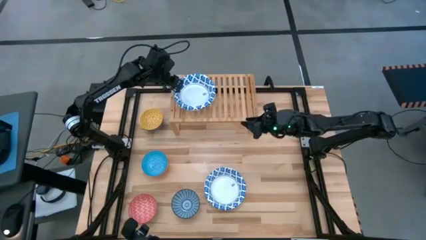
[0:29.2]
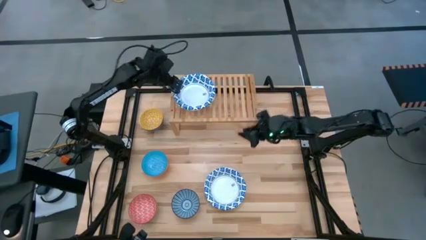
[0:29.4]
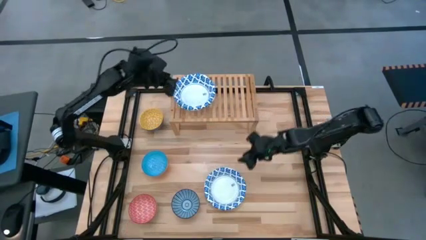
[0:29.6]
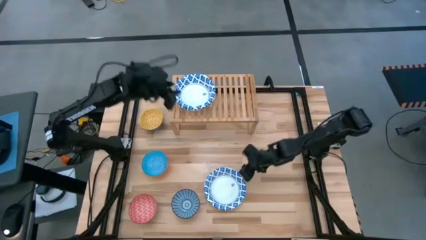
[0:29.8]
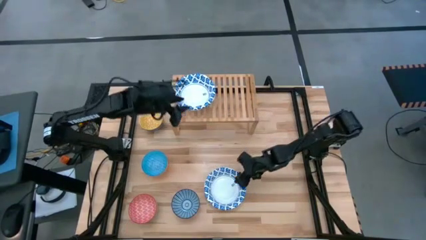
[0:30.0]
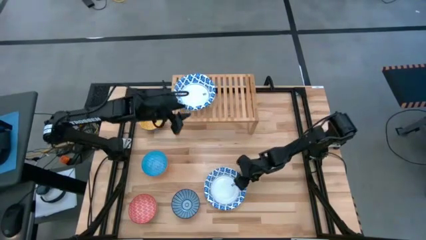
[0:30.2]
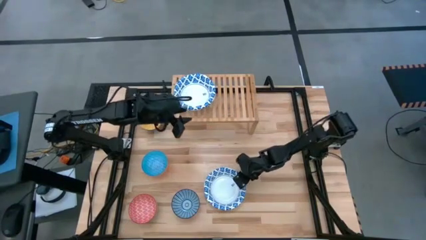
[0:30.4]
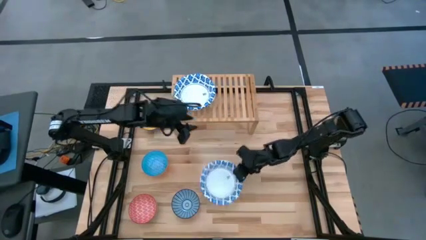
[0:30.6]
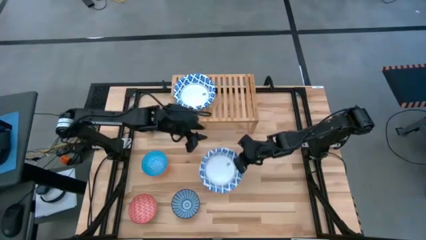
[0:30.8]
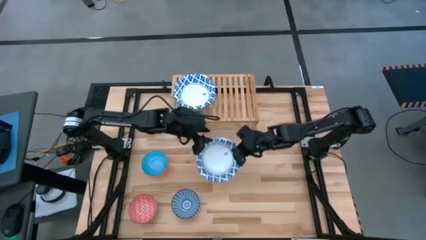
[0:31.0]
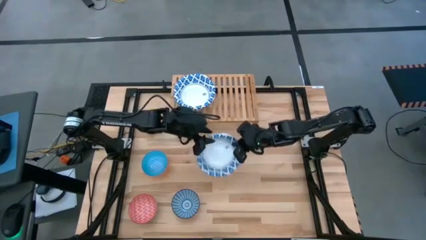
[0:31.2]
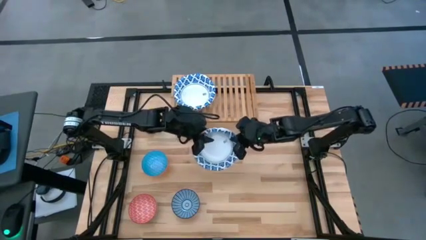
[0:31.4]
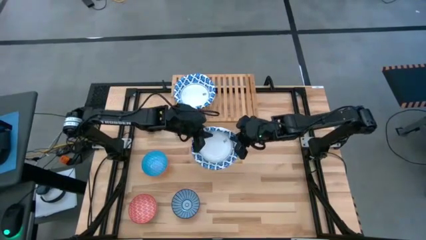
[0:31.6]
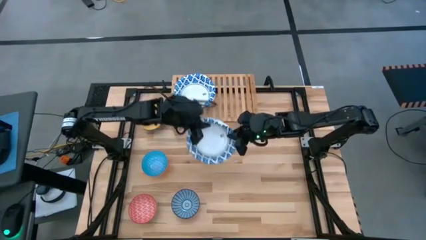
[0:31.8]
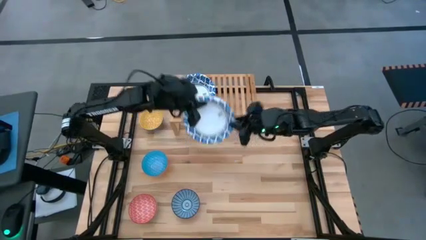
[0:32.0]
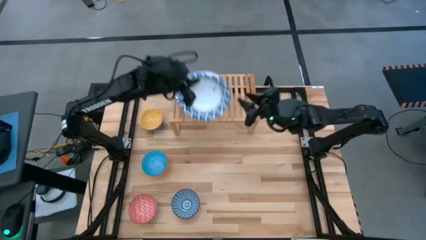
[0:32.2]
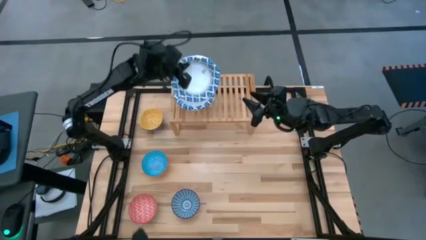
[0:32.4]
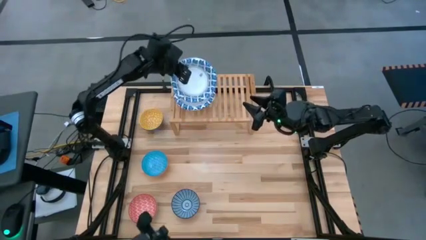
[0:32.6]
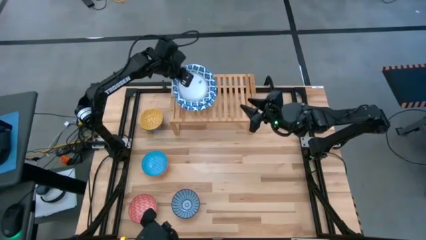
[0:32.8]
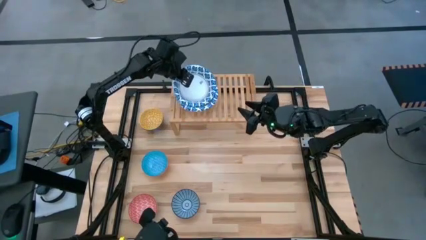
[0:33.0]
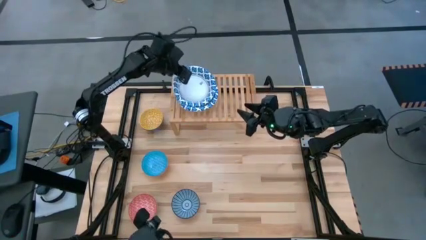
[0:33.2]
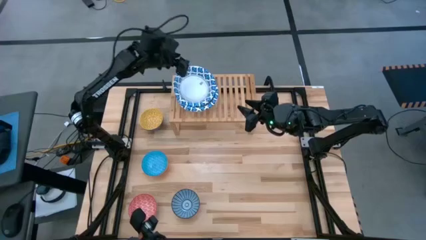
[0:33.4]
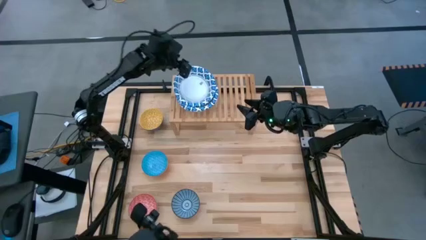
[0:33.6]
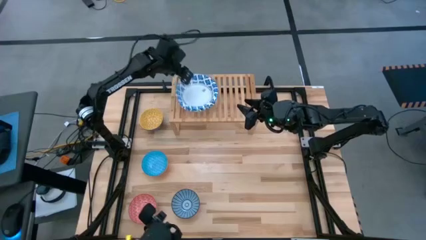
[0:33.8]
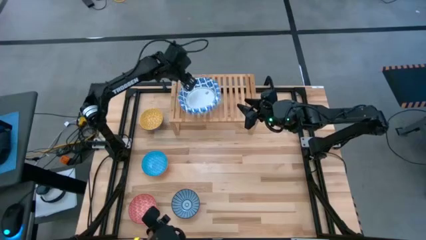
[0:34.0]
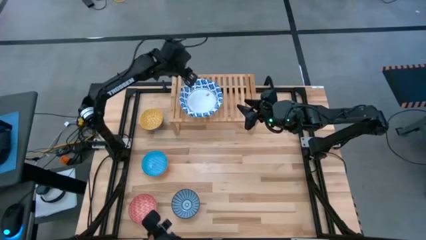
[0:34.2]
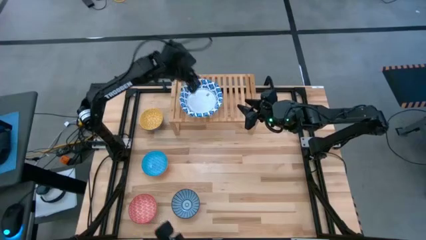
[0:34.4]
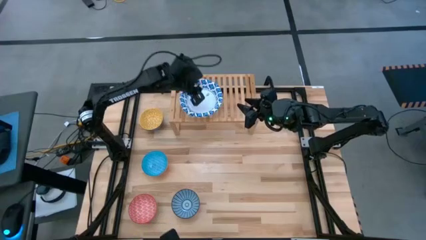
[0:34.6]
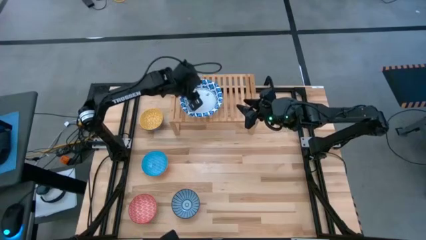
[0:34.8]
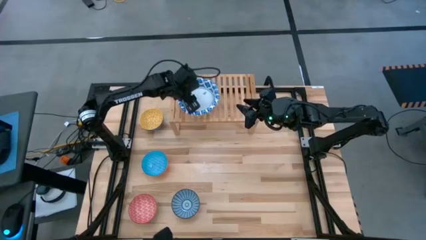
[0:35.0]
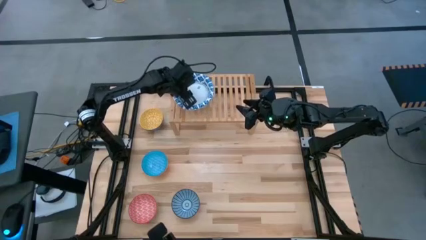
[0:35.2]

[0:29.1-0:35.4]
Task: Place and stack bowls onto a shelf
Stack the white patterned bowl on top of the other white patterned bowl on the shelf

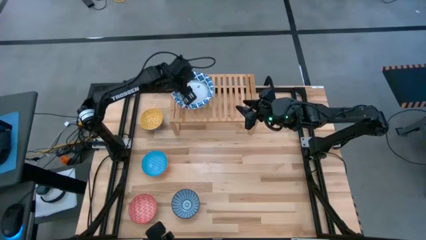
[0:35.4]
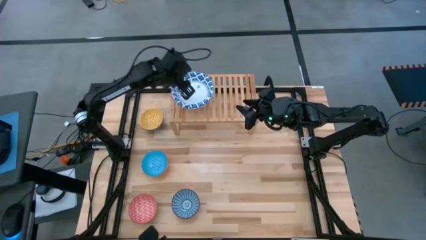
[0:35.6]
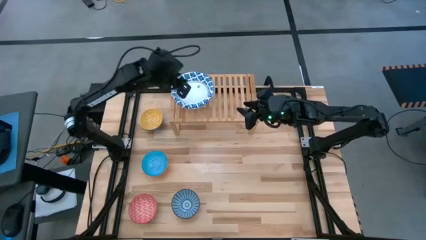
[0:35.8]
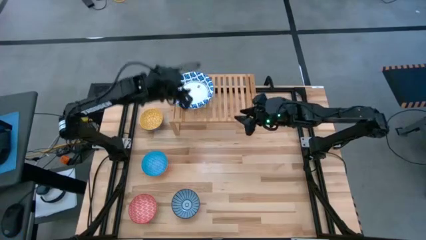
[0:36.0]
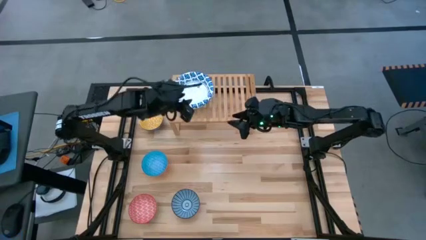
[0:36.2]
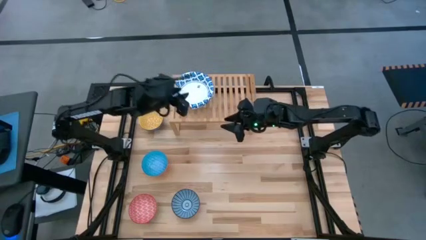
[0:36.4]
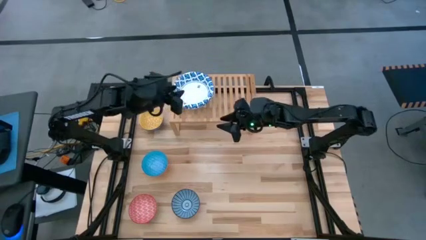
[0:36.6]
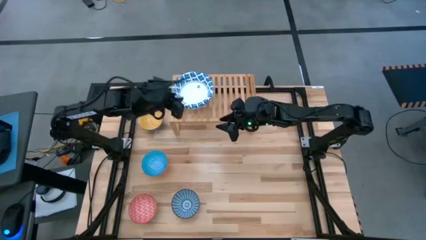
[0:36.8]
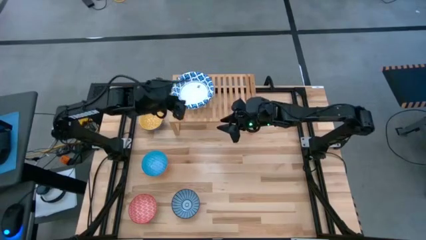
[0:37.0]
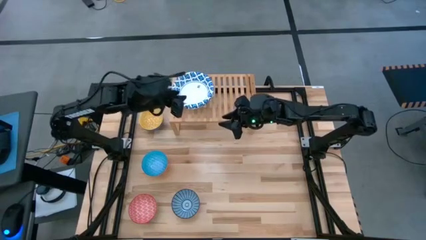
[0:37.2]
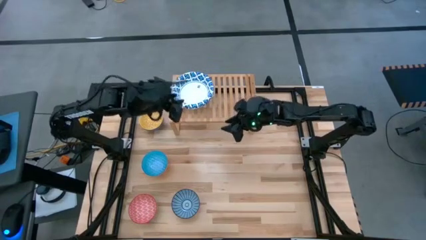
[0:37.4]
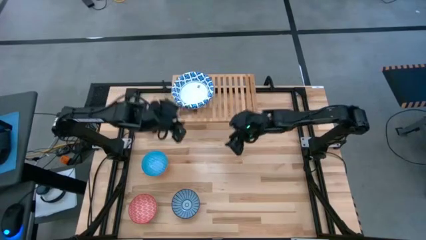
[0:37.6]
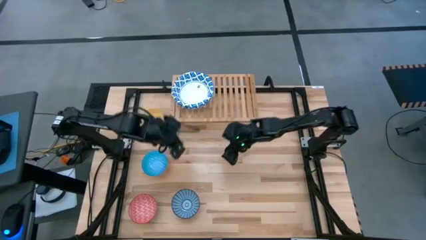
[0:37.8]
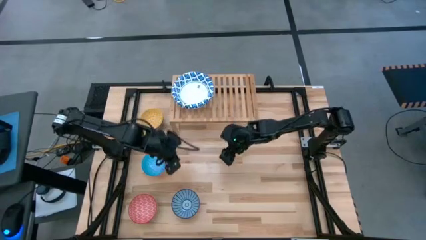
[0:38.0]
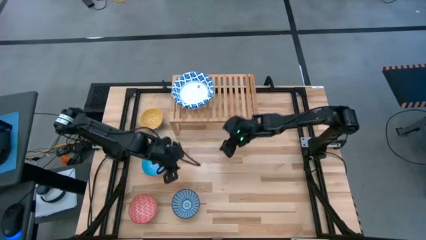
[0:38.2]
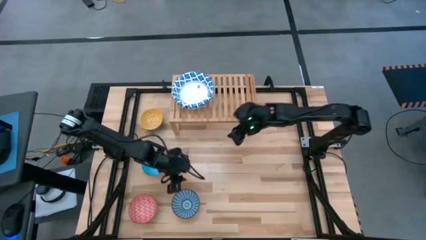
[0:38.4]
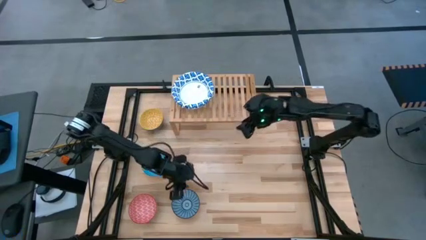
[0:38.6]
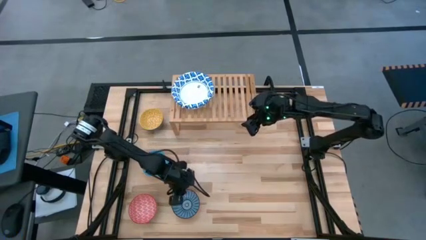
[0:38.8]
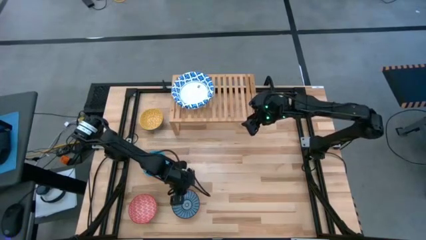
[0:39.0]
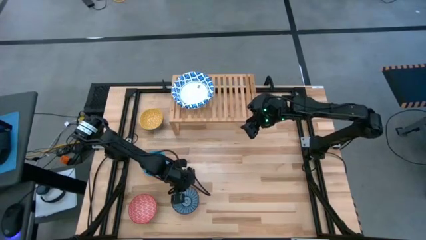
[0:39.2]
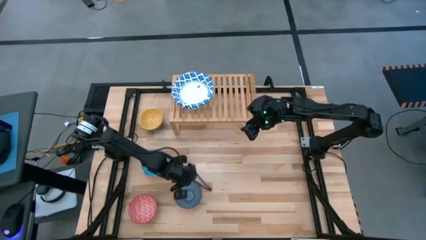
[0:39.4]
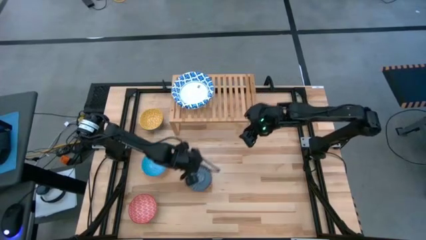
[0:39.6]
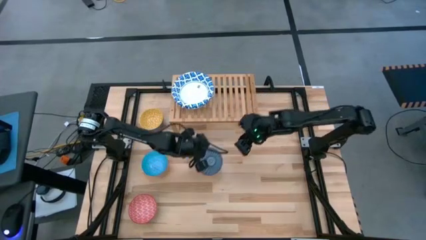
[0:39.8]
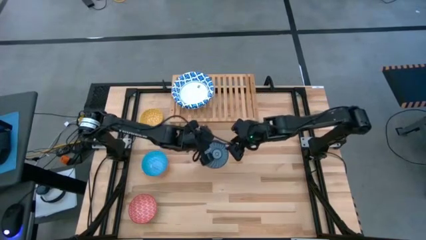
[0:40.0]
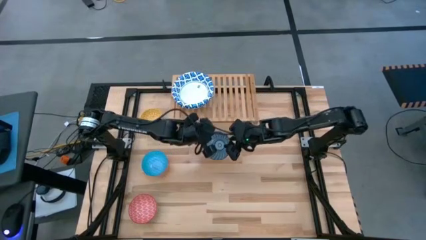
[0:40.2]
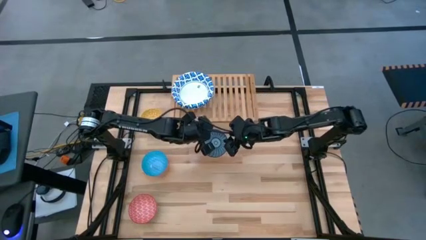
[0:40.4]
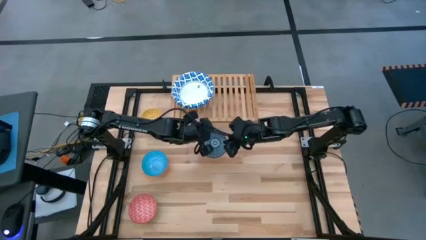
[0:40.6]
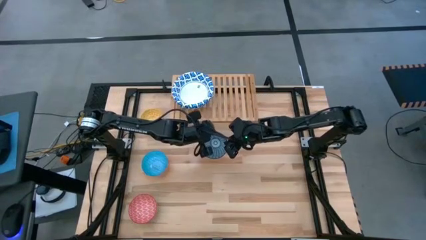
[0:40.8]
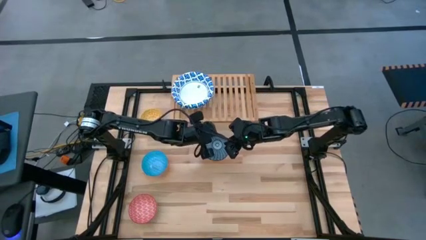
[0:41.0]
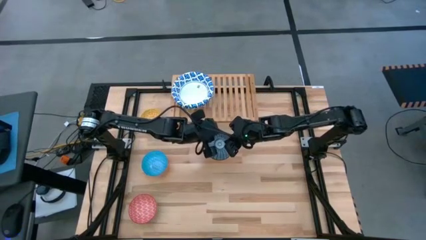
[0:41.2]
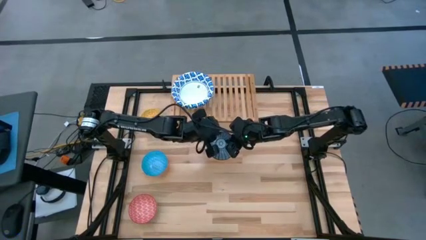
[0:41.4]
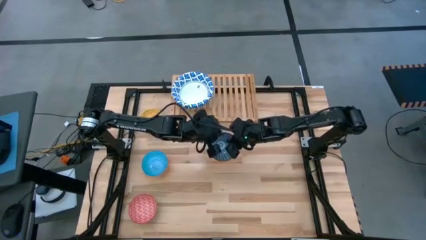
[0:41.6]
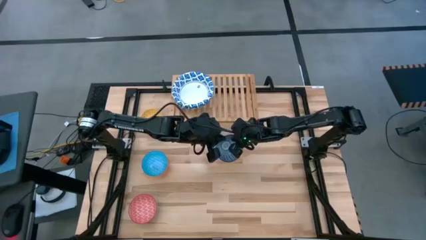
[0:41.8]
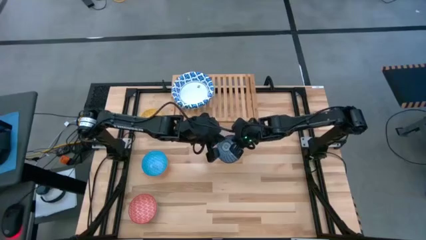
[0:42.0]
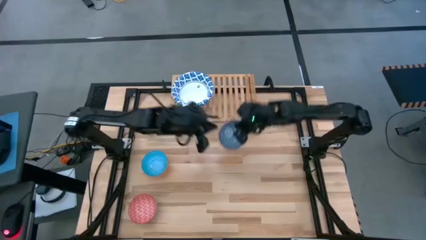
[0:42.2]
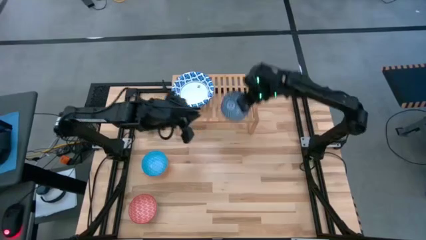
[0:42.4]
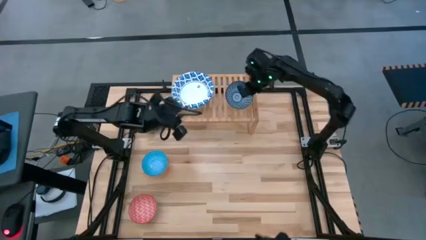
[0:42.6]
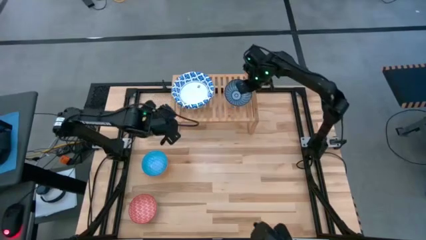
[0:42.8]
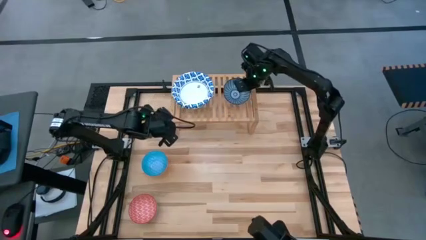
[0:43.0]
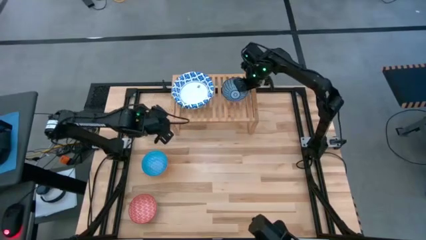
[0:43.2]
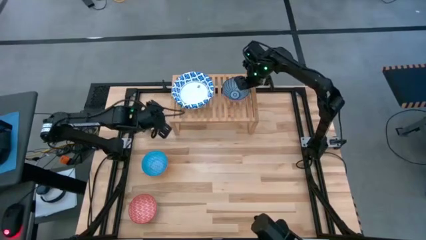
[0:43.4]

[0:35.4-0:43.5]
Put the red blue patterned bowl on the shelf

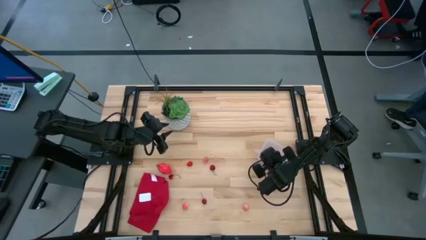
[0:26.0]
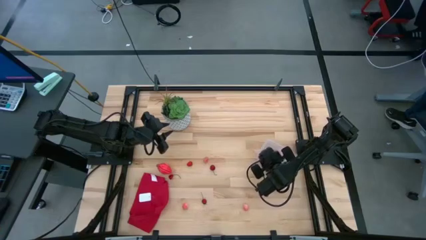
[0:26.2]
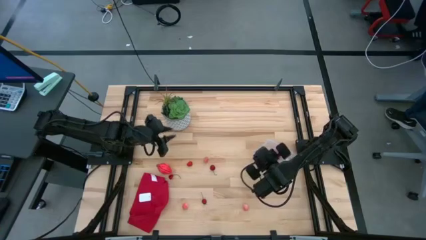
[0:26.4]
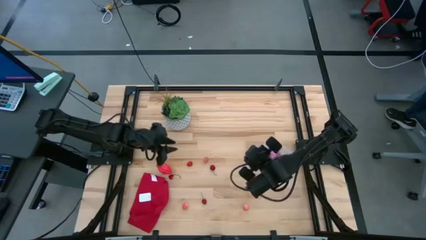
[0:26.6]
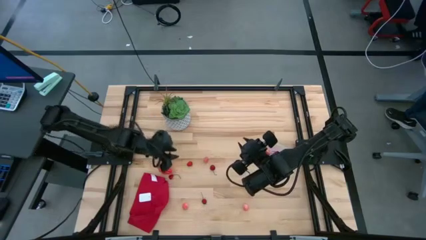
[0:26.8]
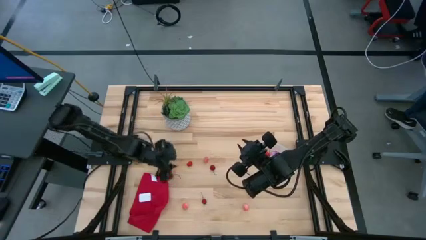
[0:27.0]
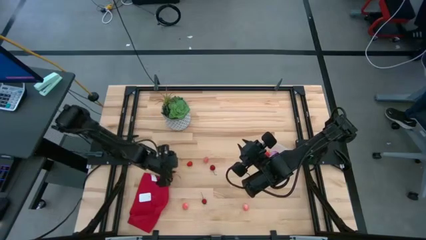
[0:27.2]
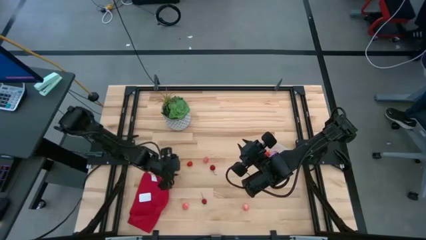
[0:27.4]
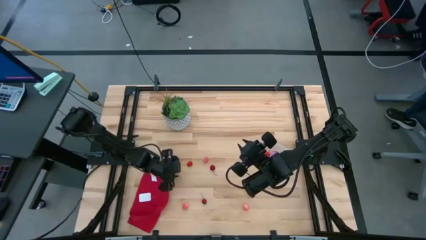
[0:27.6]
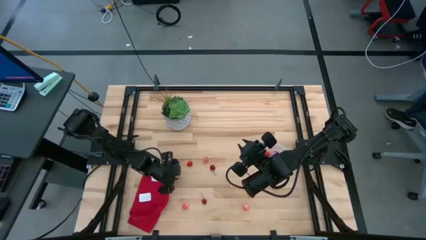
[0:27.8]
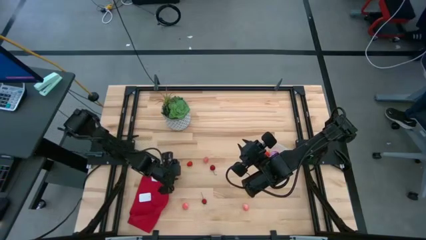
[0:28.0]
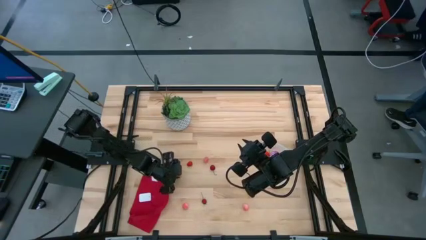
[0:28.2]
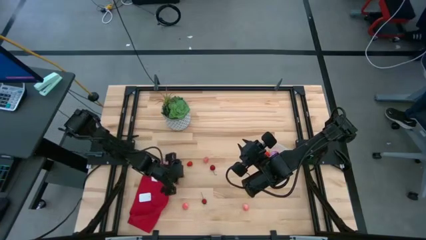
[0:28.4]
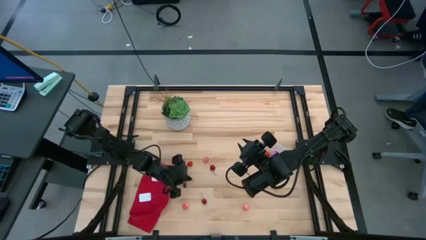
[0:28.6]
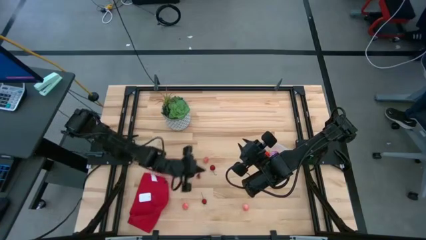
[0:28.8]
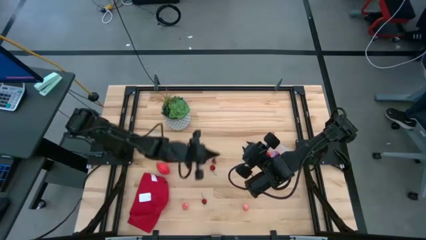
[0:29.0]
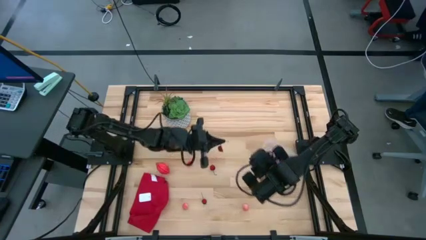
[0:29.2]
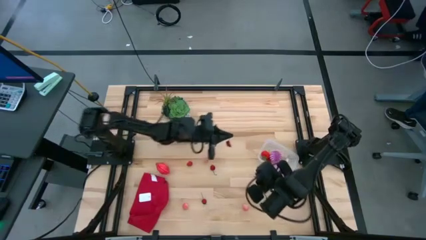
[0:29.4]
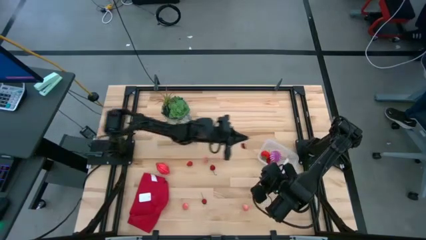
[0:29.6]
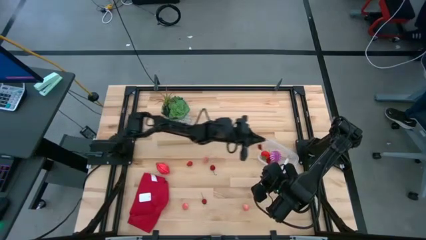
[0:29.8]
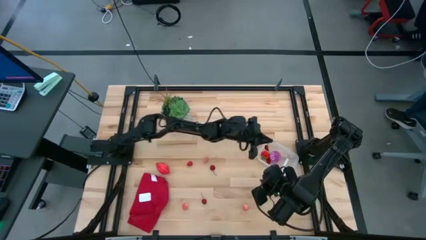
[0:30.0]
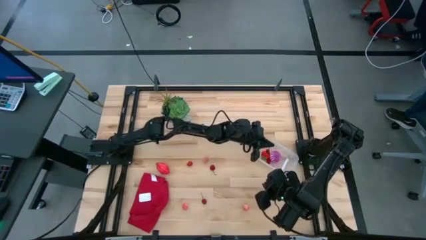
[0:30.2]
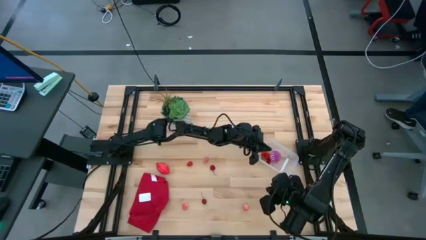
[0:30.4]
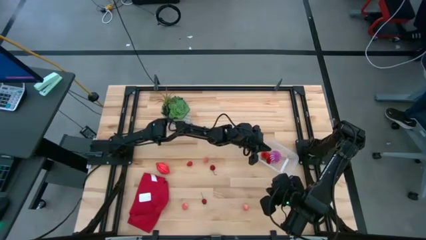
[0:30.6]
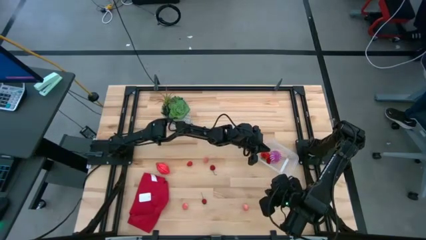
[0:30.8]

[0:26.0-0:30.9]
Task: Pick and placing Produce into tupperware
Put the top left red cherry into the transparent bin
